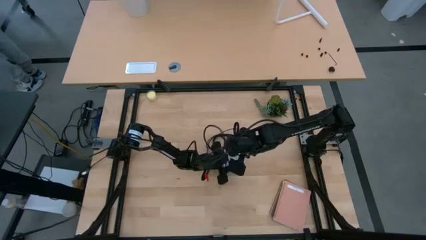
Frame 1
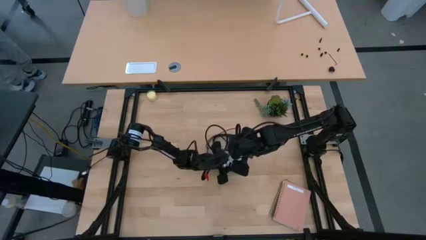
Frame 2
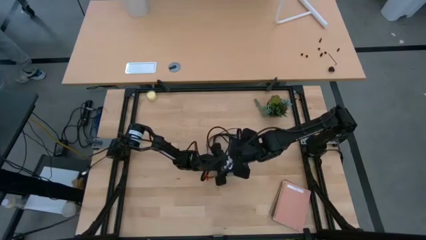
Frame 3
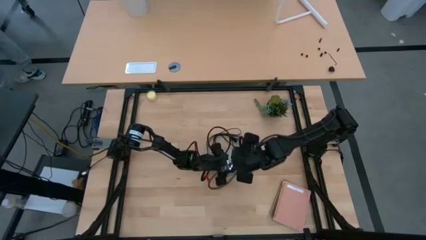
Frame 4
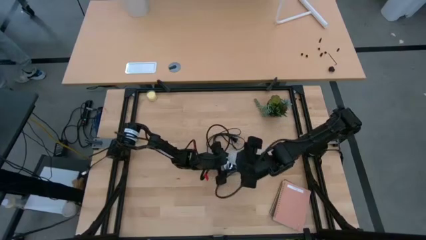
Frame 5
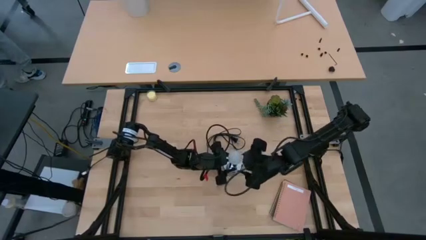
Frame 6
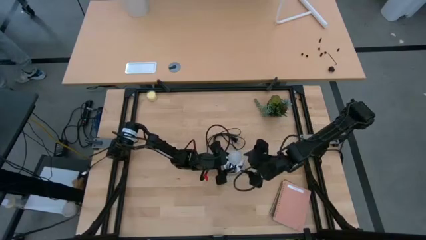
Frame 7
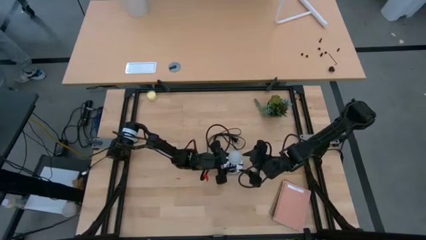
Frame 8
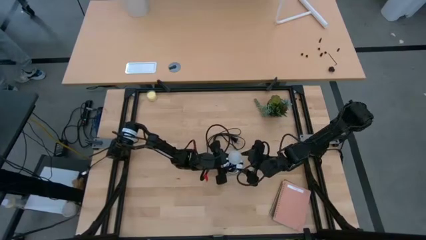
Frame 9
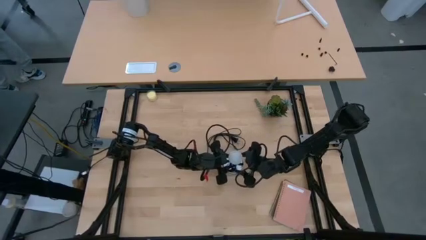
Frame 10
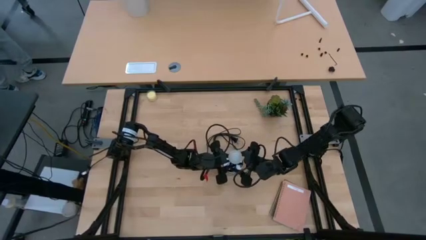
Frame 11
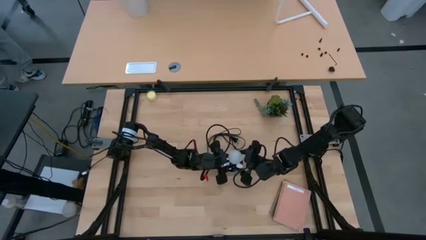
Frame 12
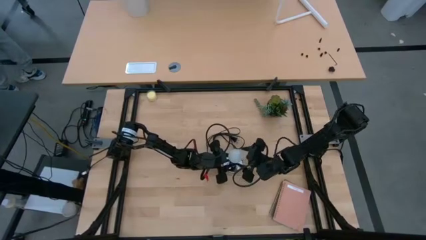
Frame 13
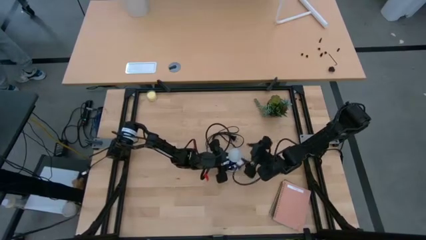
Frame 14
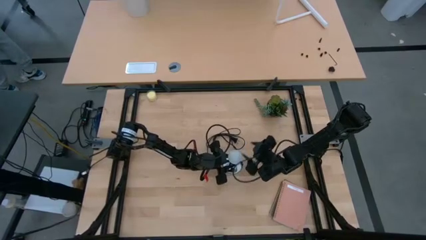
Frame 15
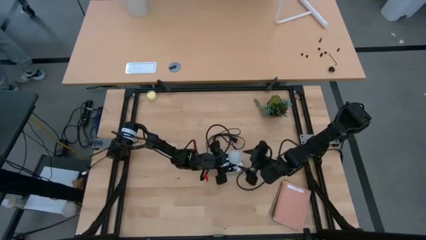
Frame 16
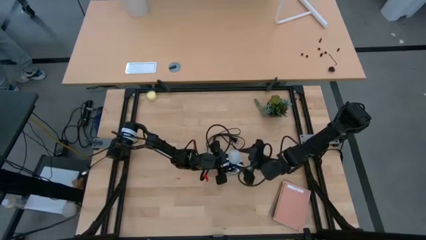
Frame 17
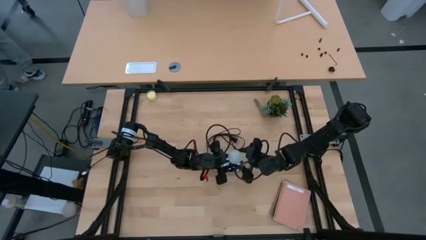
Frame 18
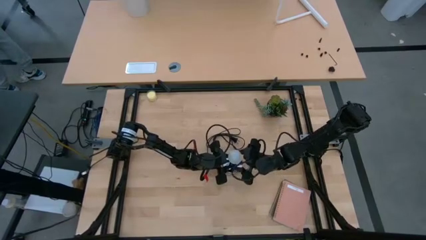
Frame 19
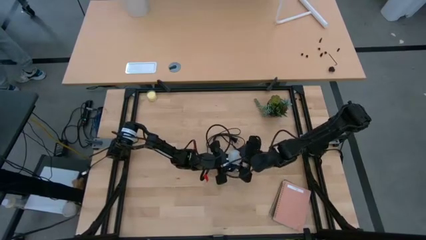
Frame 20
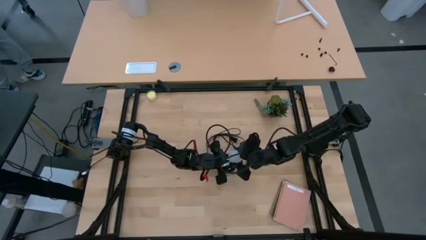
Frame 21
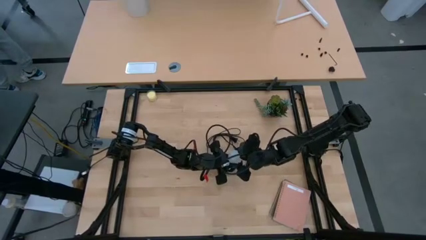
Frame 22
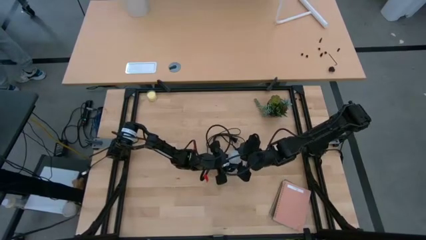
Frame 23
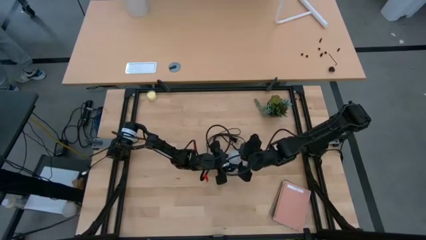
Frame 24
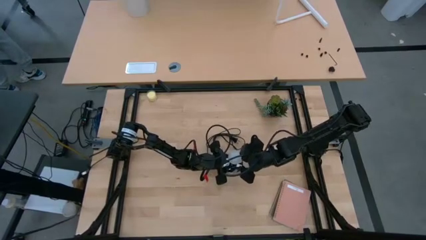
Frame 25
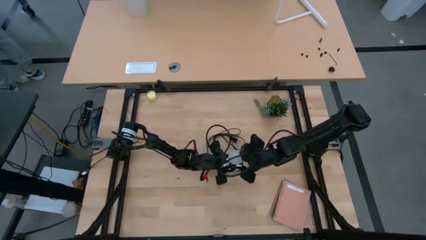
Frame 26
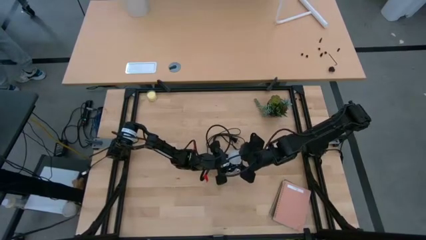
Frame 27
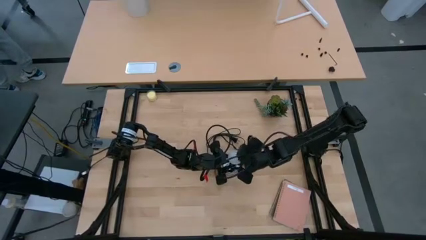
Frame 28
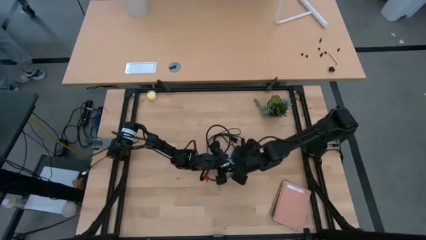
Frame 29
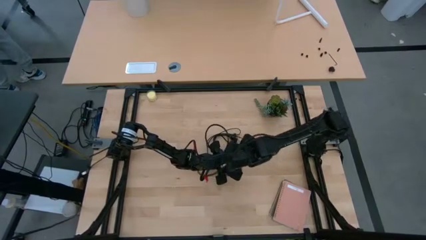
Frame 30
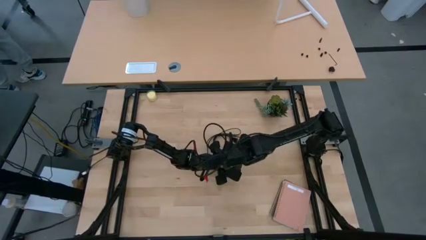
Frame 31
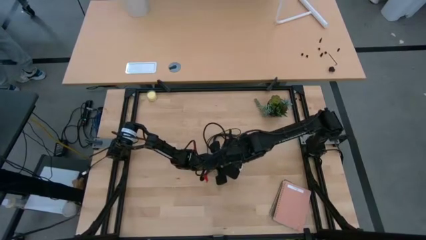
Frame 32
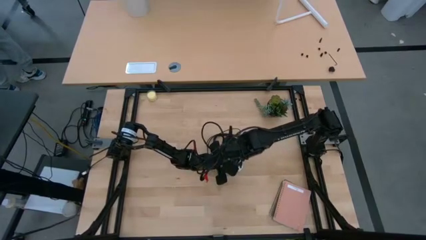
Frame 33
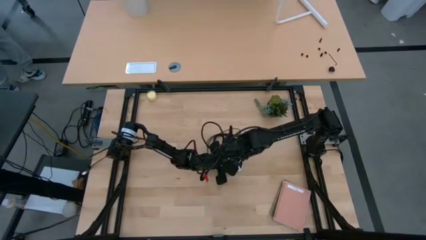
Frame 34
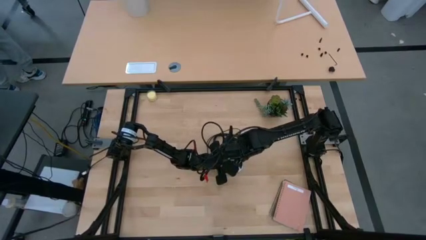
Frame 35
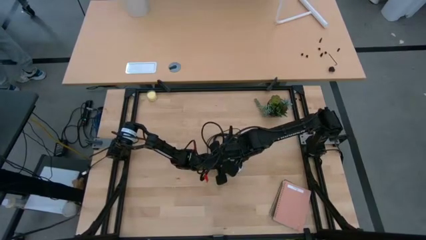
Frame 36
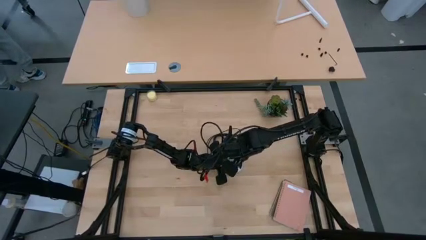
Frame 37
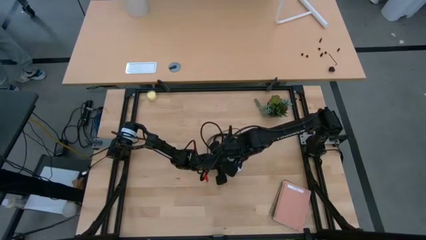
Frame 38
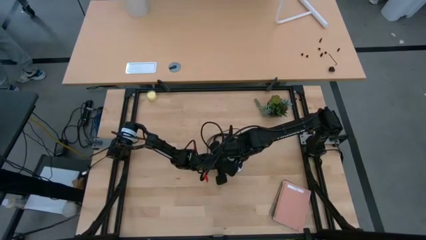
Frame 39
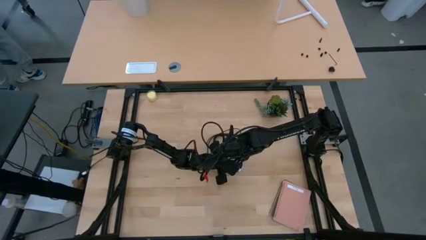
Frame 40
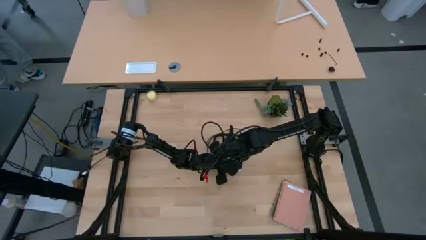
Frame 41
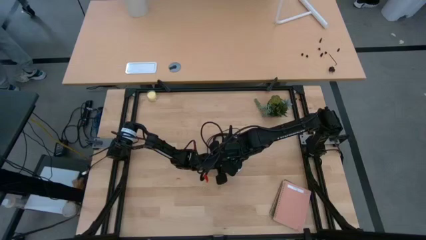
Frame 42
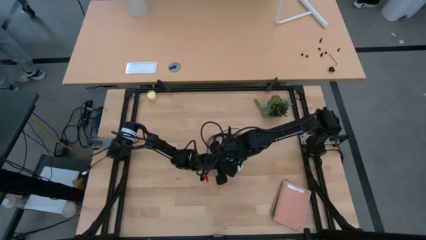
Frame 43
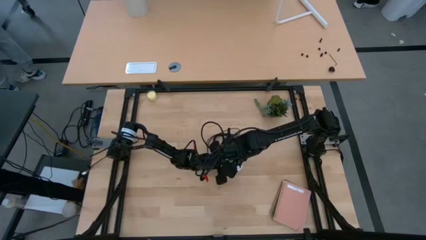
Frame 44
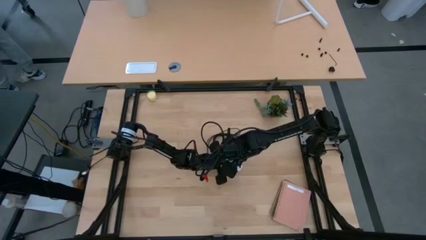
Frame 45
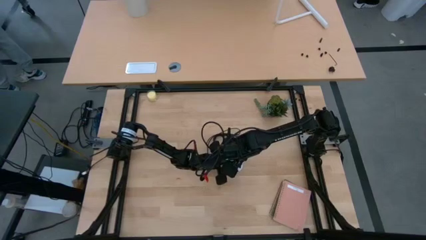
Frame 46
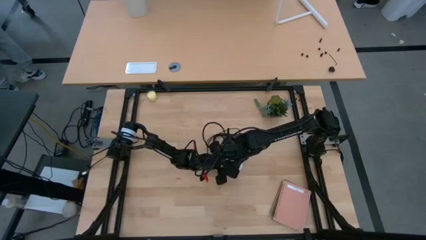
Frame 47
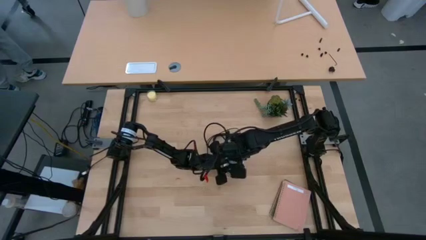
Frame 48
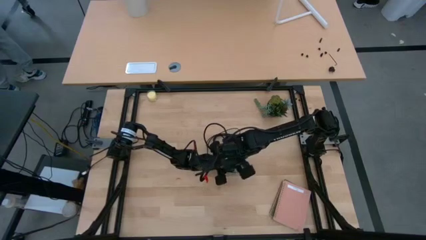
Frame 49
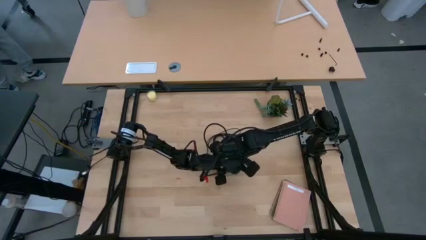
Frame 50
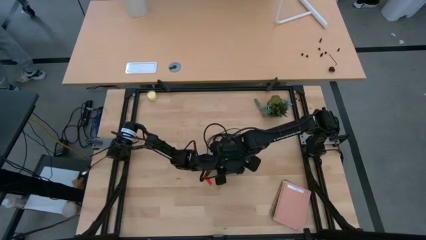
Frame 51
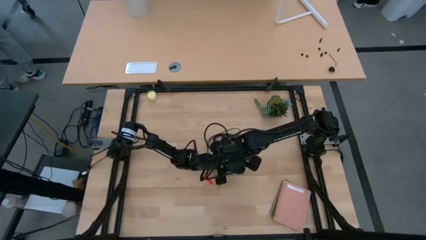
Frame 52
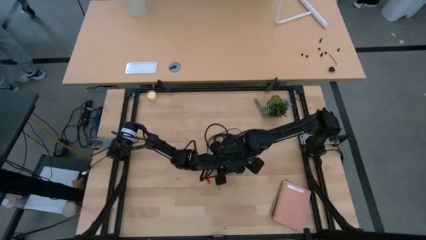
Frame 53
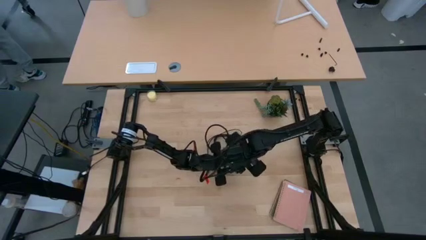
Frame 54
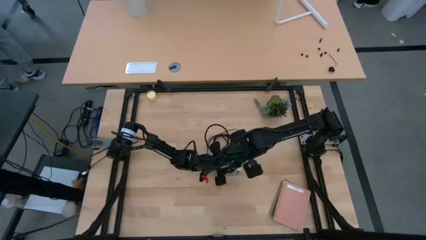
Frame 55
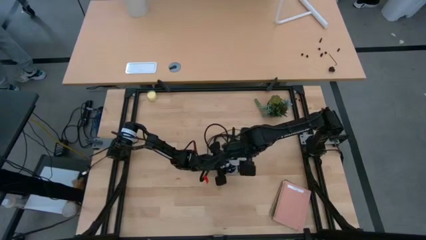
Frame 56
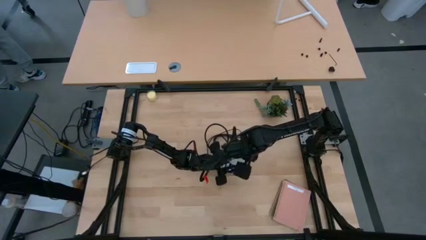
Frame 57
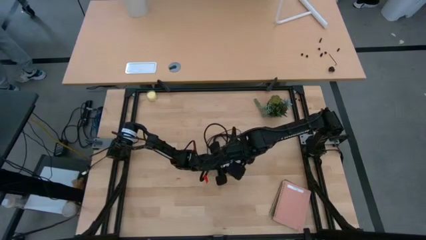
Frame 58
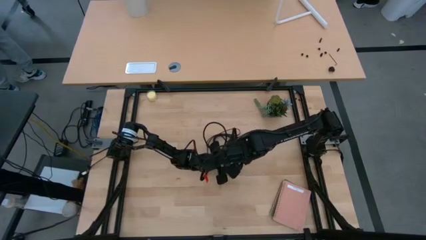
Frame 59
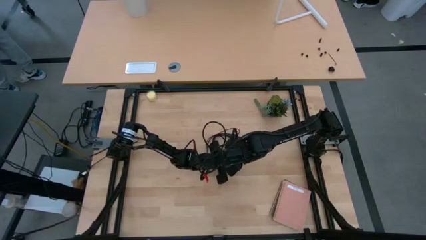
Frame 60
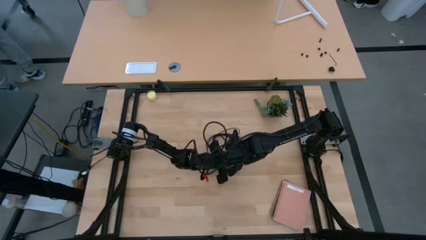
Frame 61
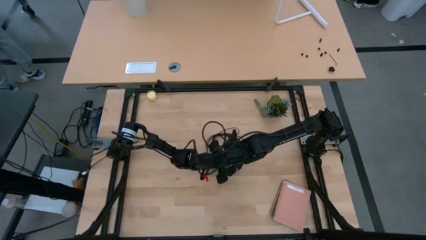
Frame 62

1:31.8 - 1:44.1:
Task: Screw lightbulb
Remove the white lightbulb from the lamp

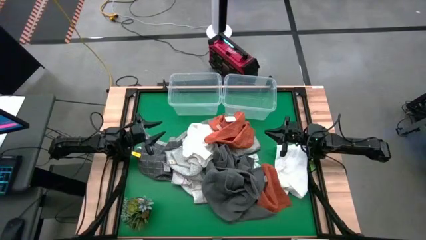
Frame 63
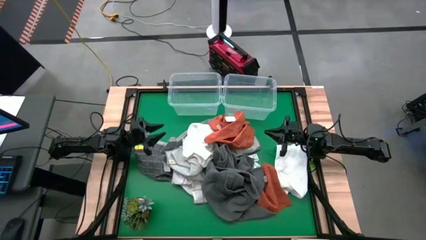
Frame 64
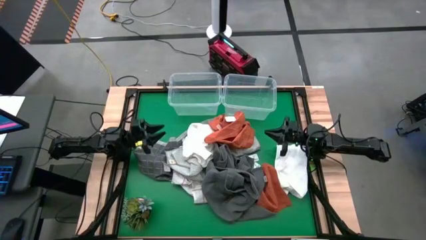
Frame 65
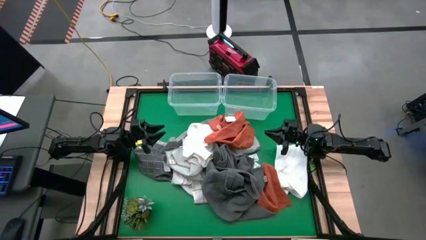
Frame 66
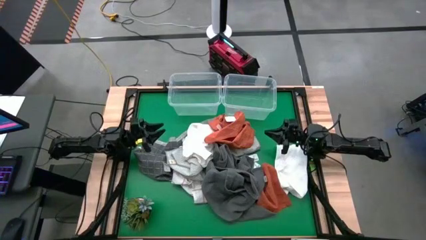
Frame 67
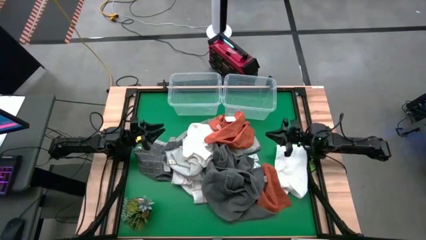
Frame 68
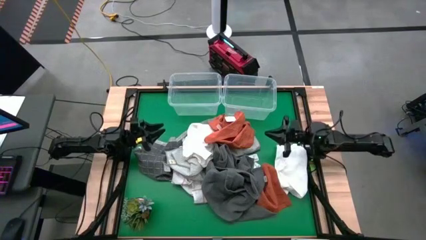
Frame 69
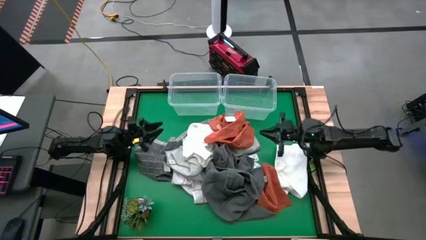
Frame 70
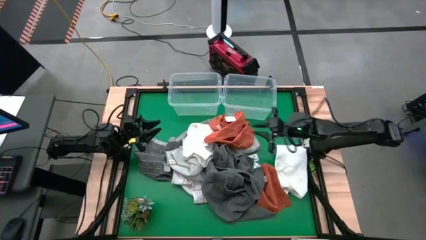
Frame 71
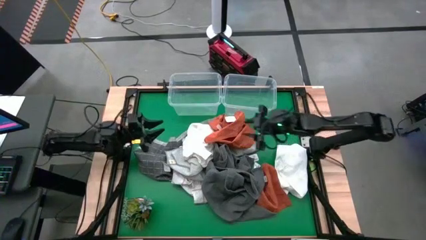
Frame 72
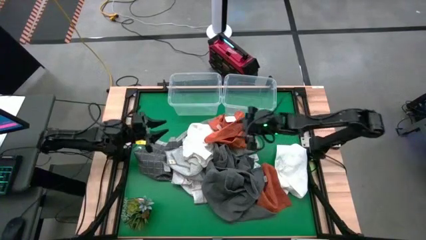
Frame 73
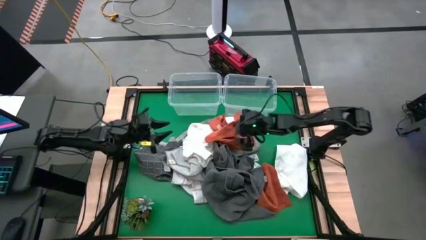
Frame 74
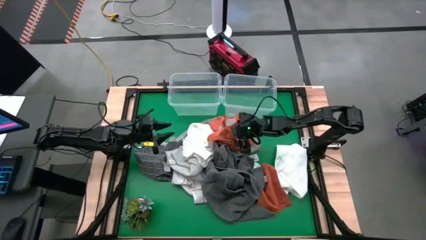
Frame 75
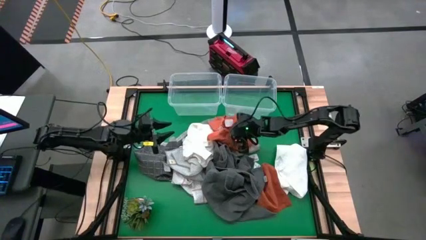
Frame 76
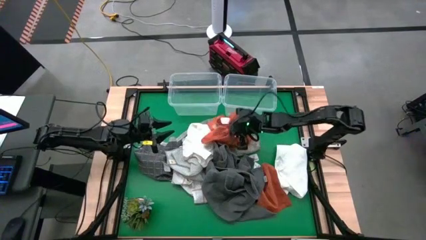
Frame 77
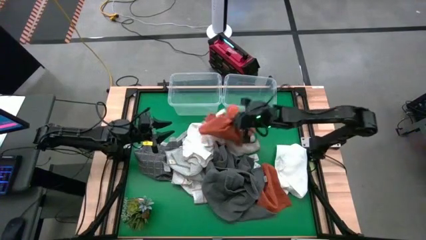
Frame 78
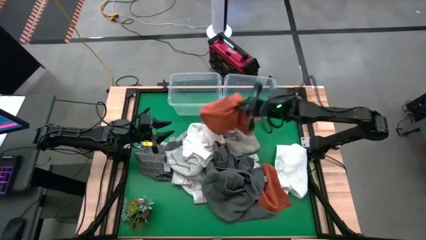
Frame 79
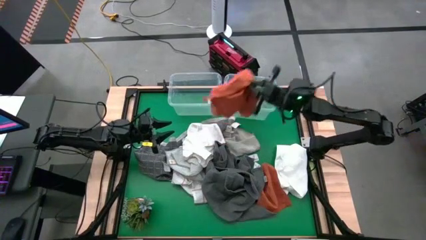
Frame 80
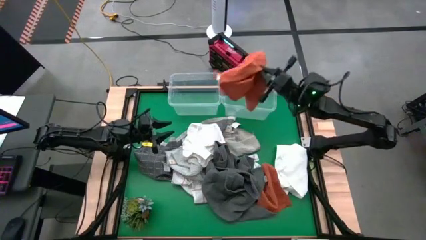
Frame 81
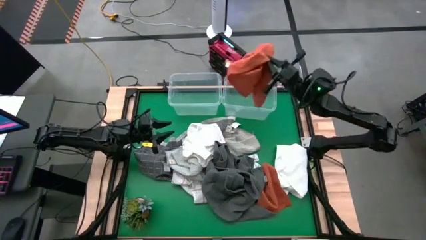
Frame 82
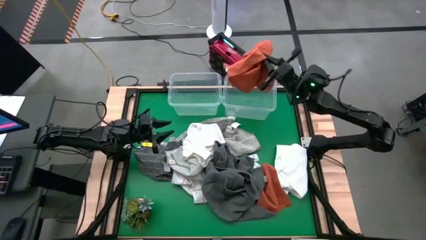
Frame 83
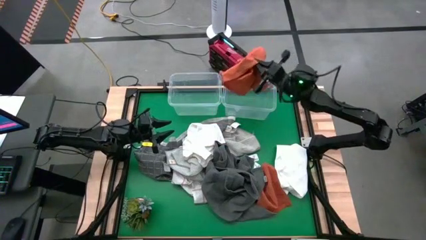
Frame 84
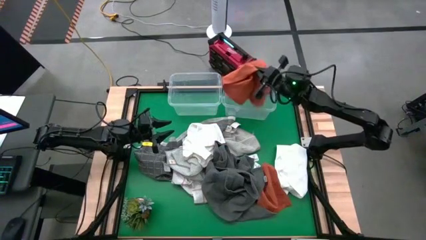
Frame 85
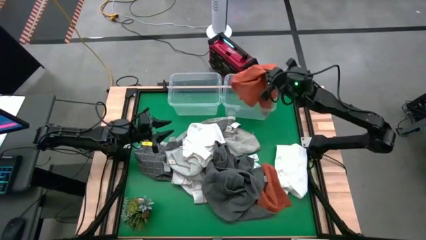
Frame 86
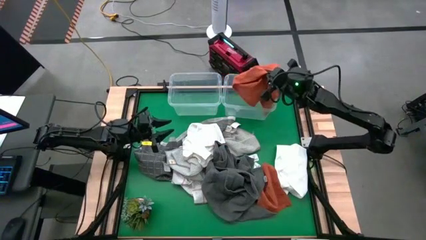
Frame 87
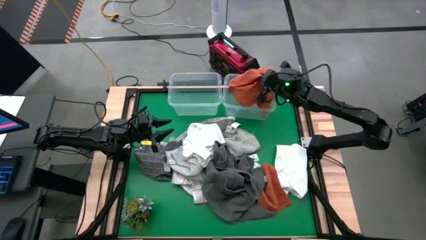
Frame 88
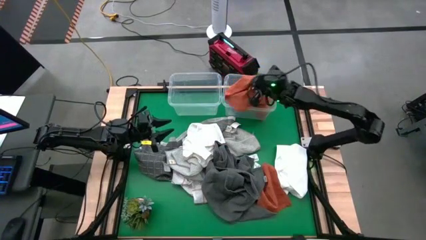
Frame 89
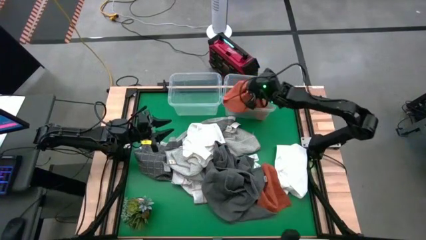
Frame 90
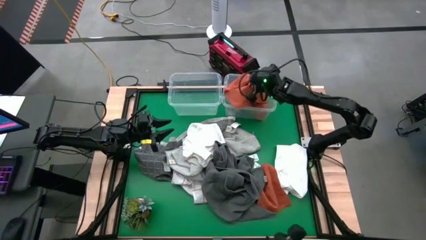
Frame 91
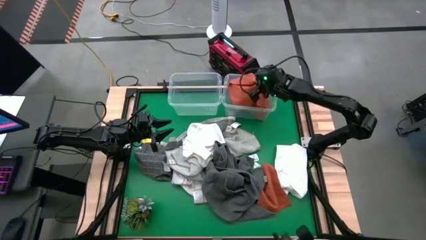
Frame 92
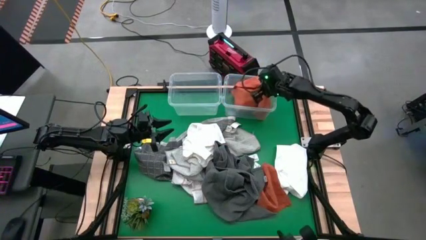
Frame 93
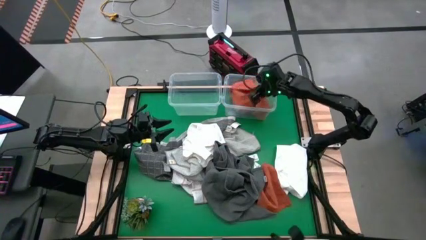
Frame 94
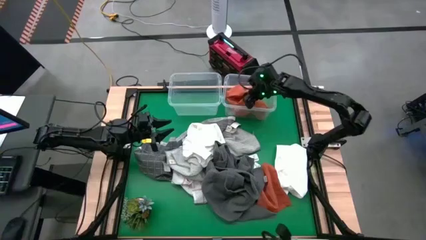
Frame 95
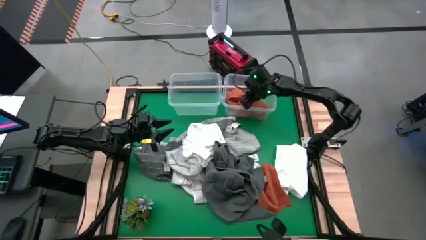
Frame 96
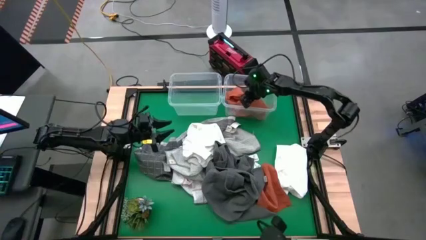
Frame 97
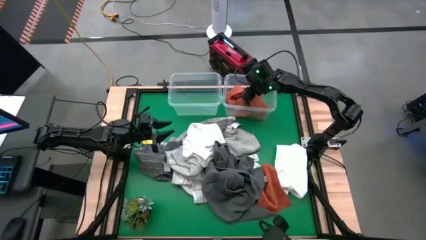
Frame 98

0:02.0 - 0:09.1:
Task: Sort towels by color in basket
Put the orange towel into the right transparent bin
